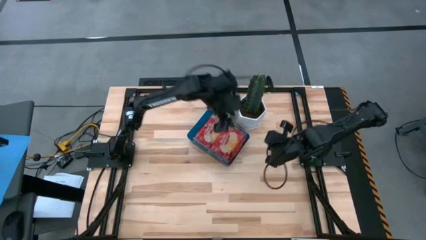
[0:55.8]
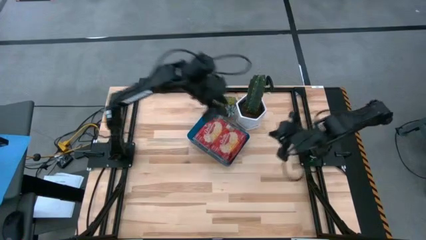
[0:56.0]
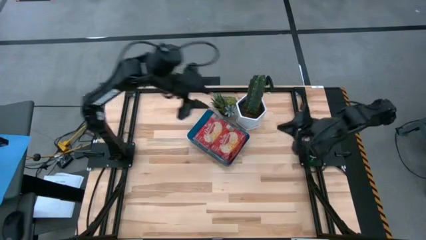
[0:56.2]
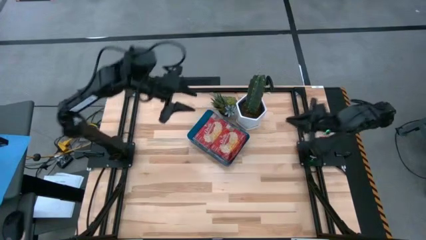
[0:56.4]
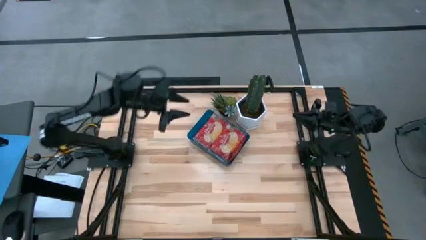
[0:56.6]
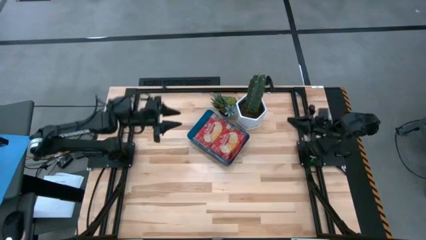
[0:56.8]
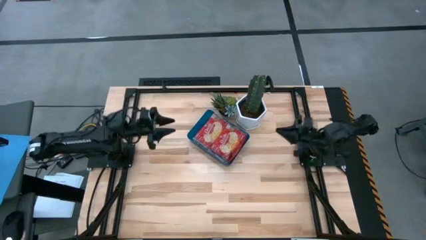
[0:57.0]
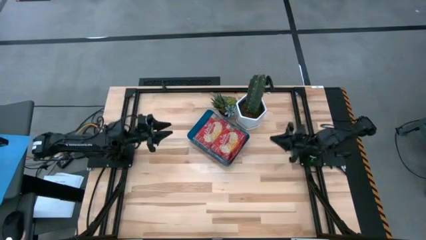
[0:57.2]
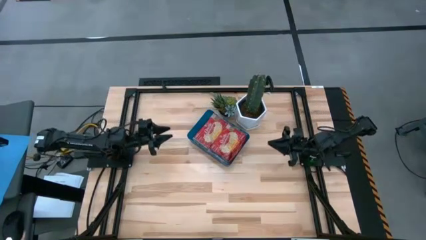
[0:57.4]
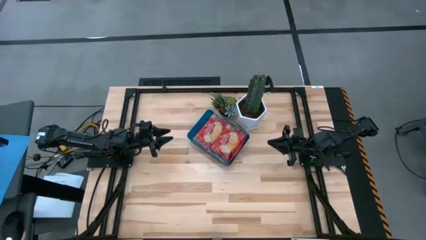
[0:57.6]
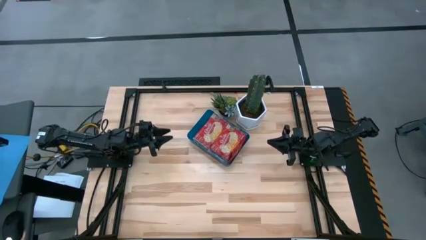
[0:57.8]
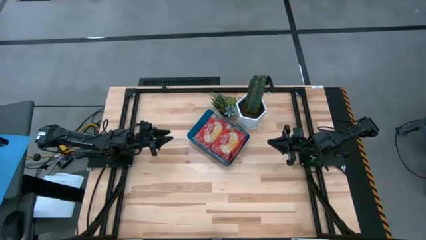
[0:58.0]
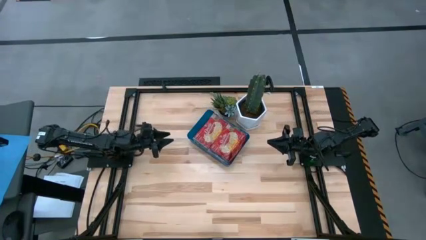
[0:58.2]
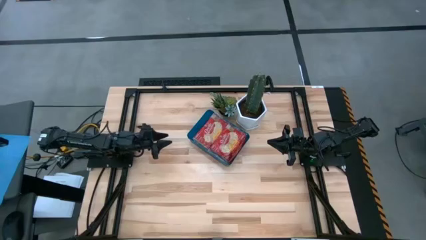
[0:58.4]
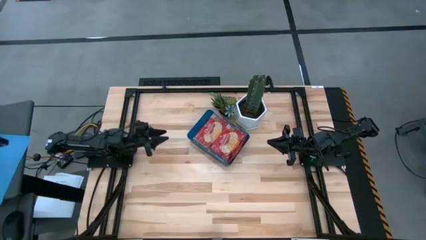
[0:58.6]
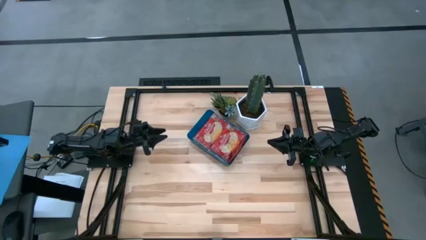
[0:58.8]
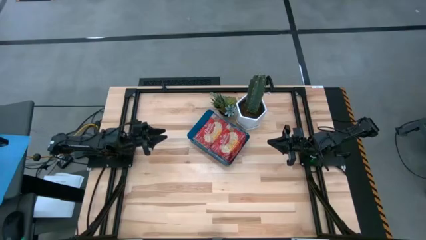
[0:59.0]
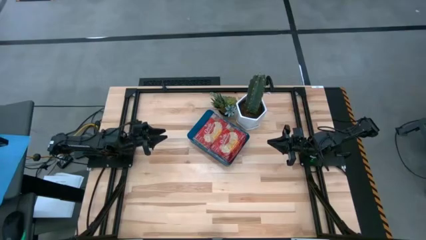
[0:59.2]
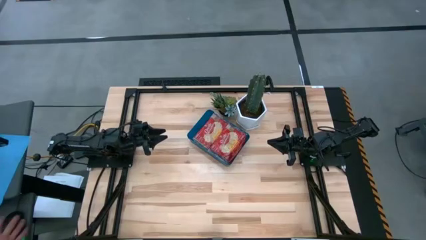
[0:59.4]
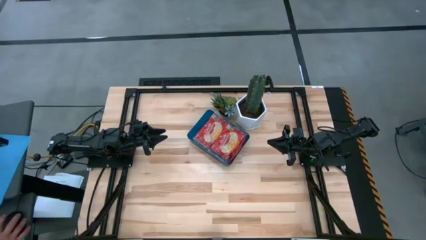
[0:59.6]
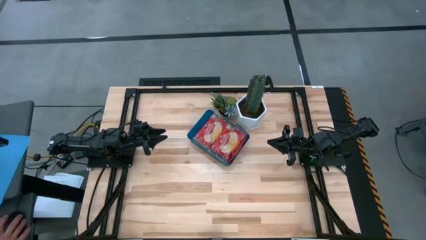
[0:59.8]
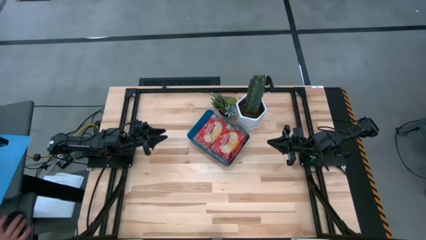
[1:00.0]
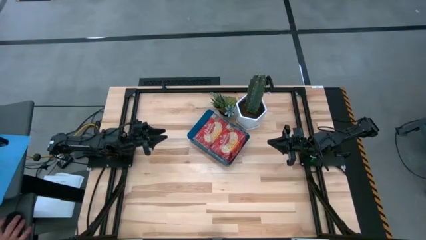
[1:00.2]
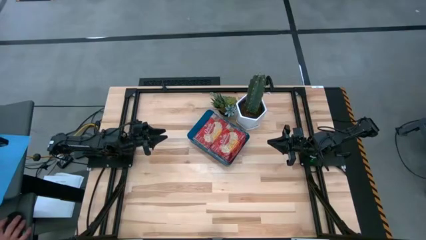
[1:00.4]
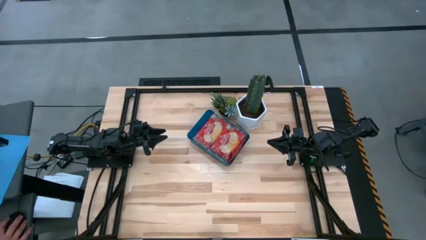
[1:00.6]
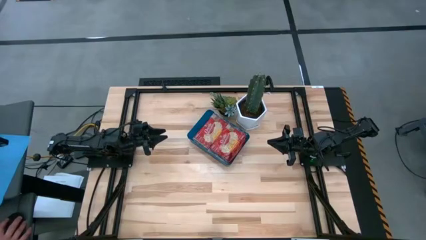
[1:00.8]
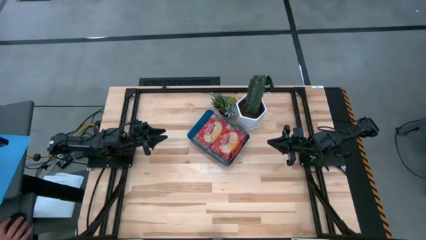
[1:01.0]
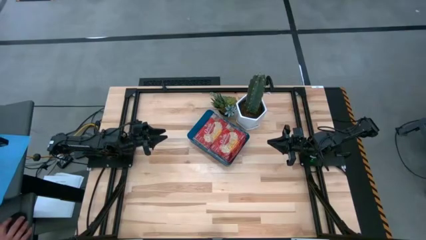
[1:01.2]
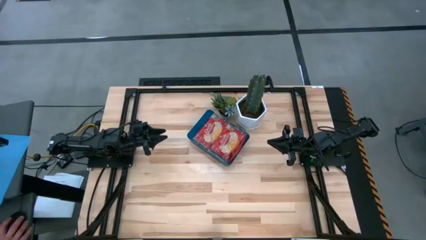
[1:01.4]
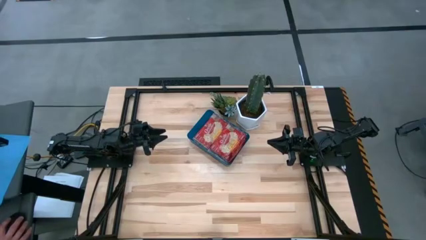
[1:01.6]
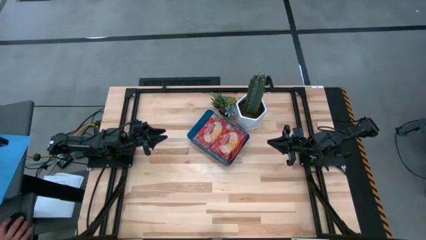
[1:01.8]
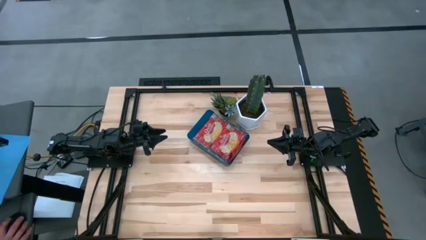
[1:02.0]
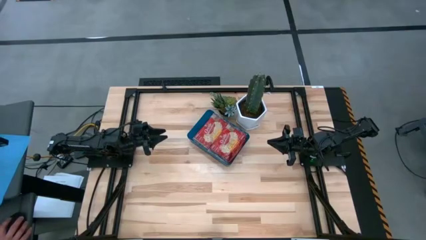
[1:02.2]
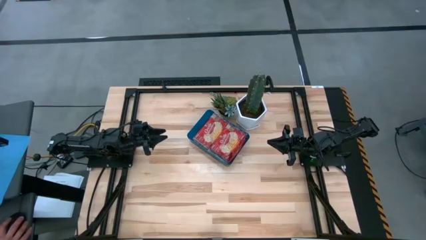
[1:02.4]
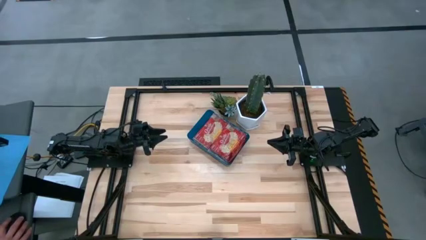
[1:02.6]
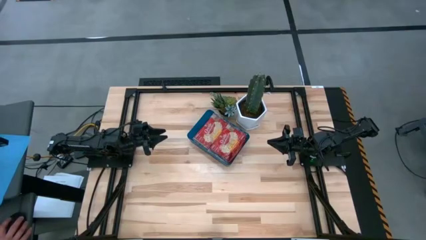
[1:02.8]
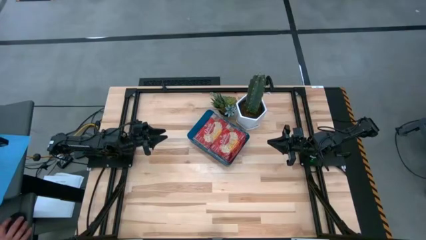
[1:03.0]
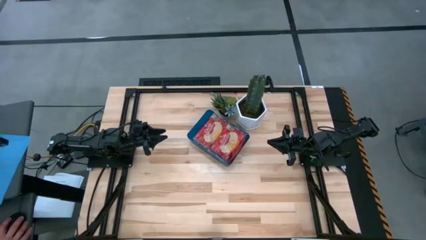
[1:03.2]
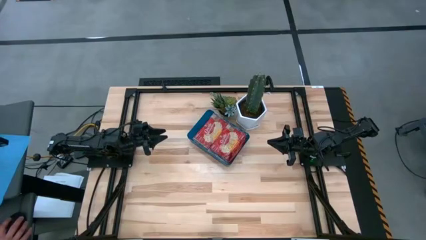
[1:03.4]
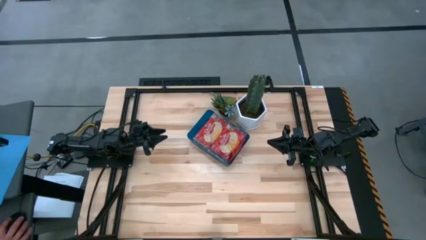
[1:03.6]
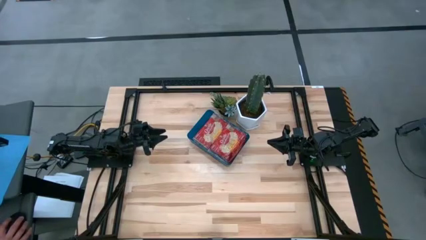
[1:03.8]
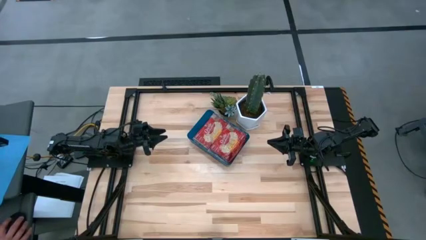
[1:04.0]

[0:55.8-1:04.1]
Task: Sort popcorn bags into baskets
Return to Home Position

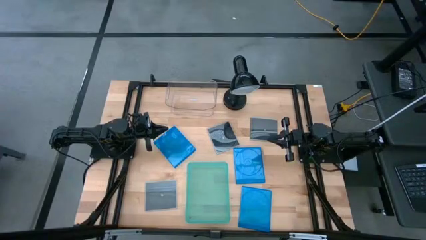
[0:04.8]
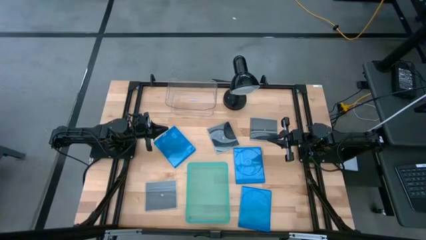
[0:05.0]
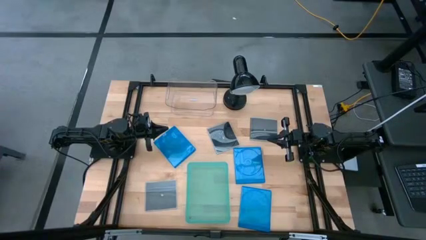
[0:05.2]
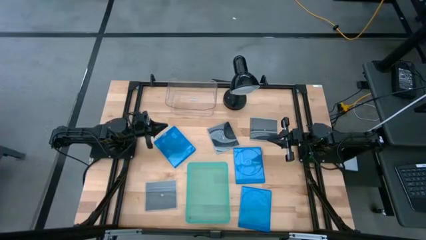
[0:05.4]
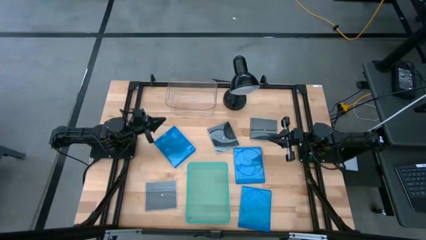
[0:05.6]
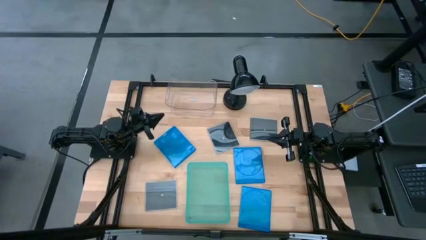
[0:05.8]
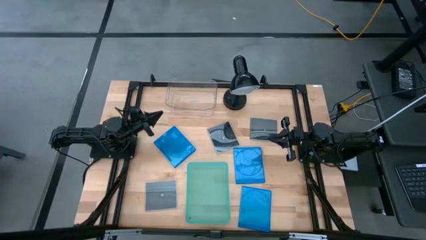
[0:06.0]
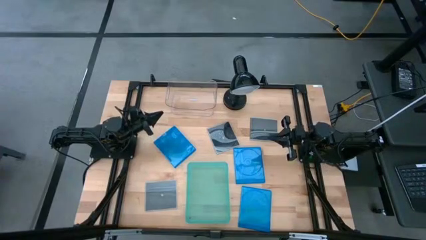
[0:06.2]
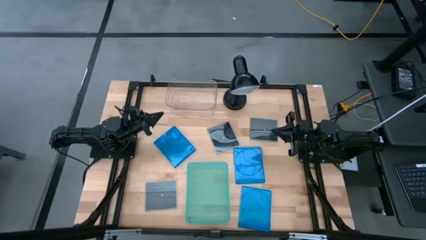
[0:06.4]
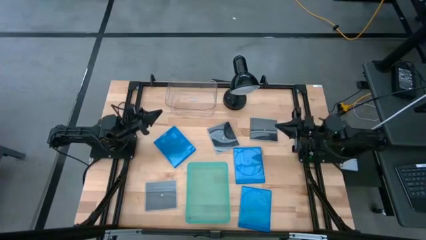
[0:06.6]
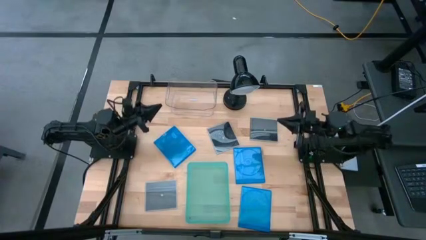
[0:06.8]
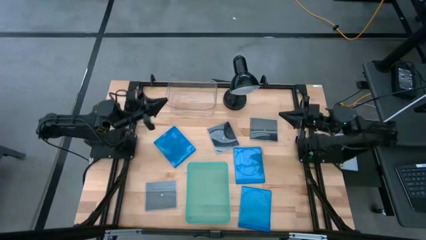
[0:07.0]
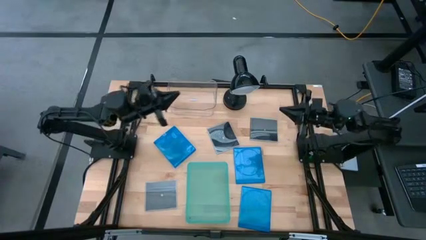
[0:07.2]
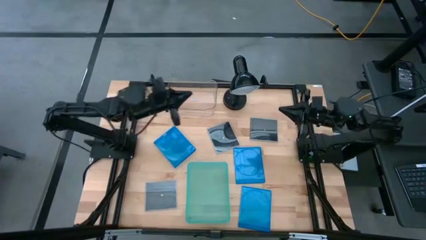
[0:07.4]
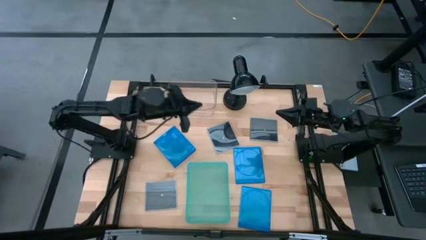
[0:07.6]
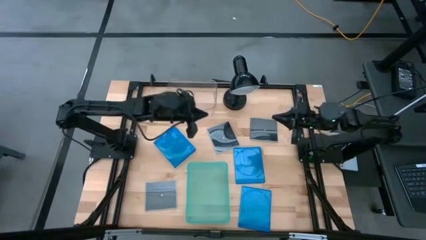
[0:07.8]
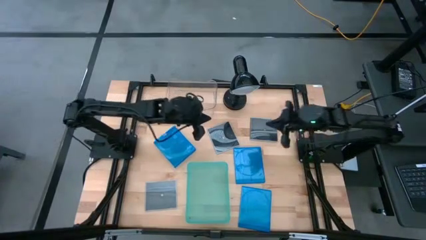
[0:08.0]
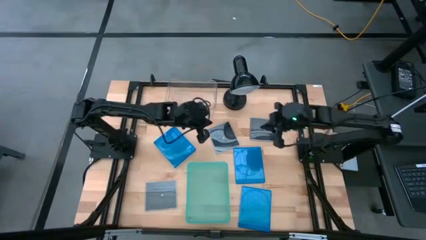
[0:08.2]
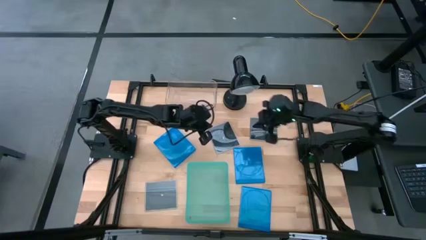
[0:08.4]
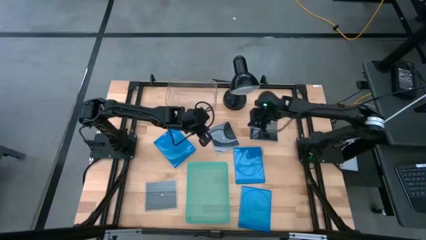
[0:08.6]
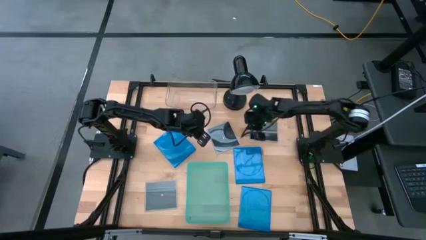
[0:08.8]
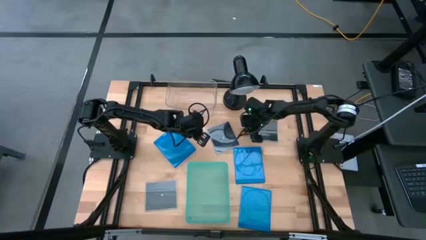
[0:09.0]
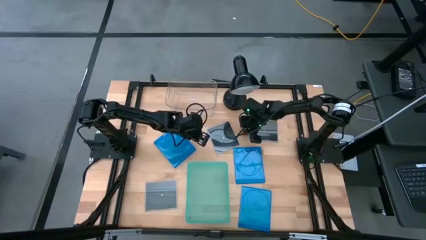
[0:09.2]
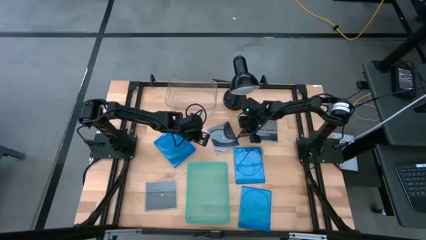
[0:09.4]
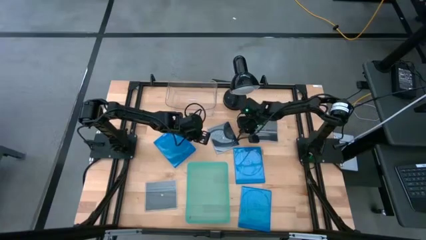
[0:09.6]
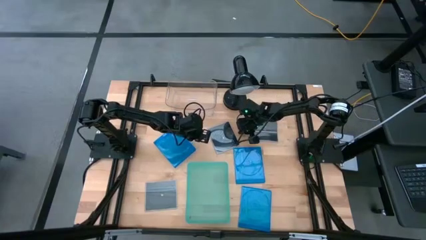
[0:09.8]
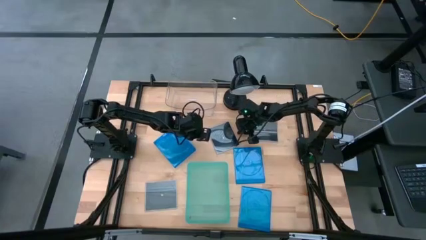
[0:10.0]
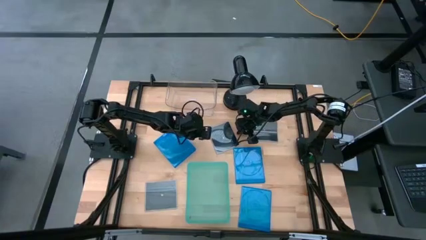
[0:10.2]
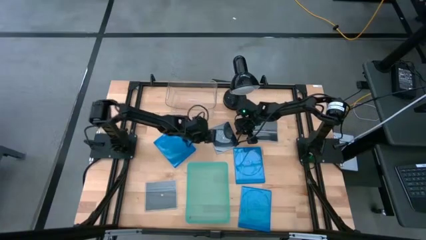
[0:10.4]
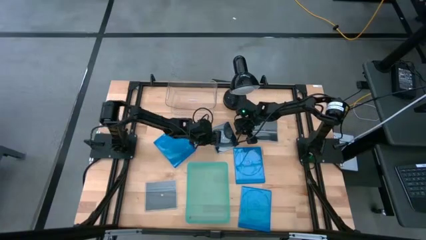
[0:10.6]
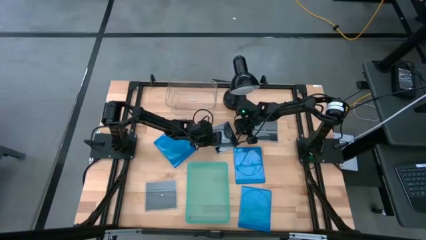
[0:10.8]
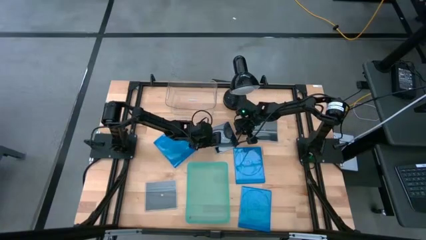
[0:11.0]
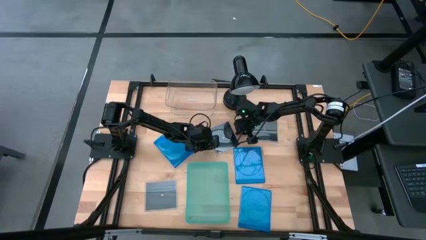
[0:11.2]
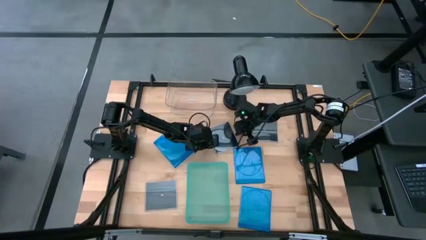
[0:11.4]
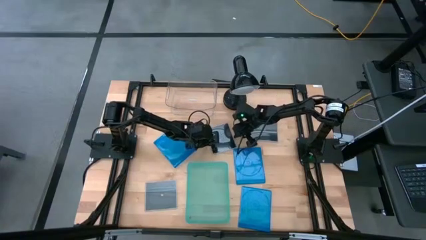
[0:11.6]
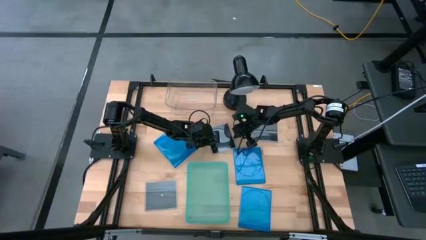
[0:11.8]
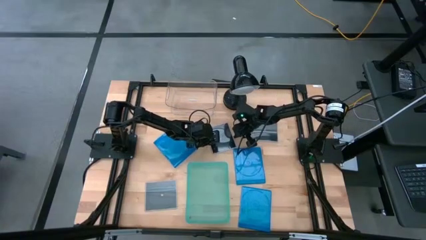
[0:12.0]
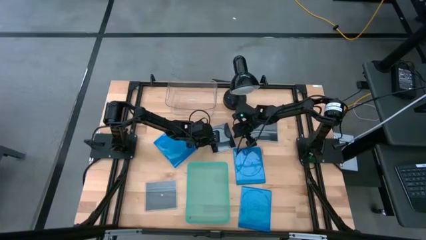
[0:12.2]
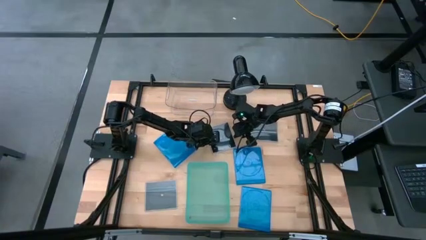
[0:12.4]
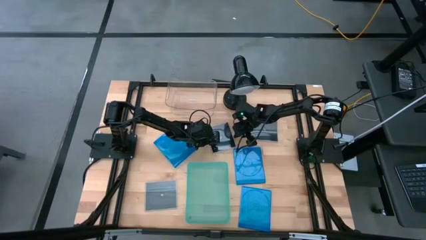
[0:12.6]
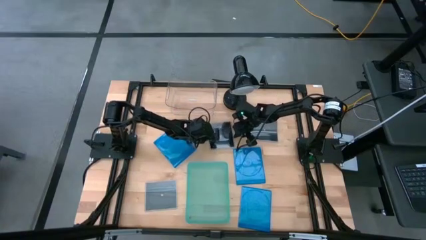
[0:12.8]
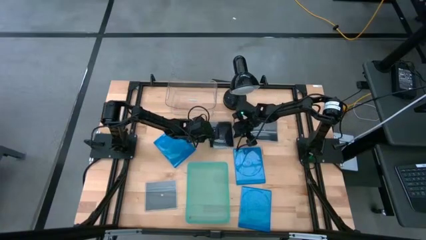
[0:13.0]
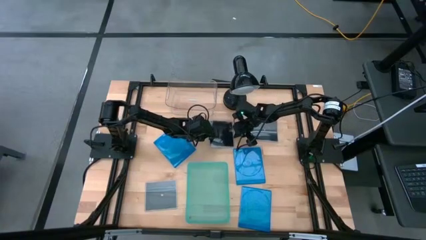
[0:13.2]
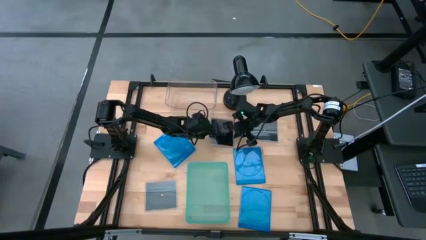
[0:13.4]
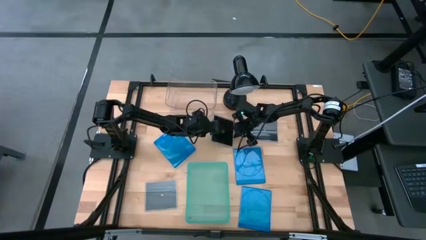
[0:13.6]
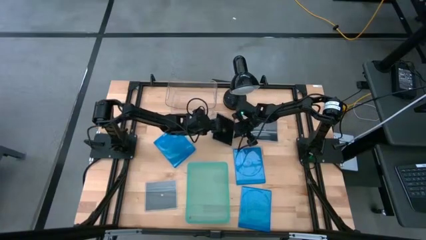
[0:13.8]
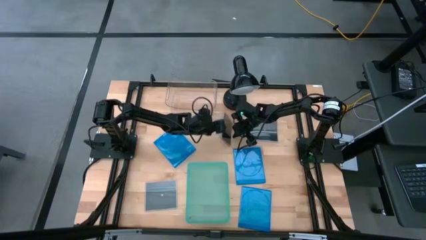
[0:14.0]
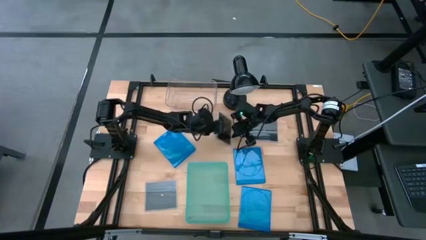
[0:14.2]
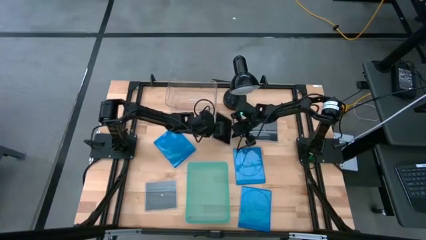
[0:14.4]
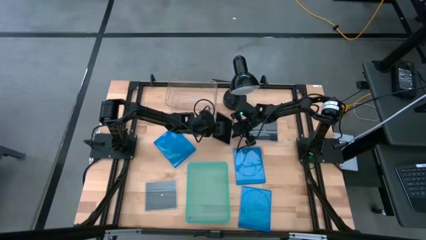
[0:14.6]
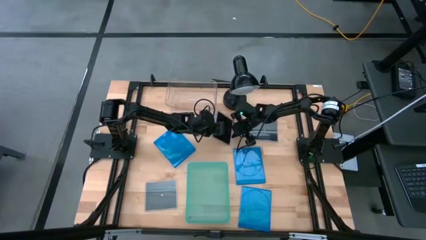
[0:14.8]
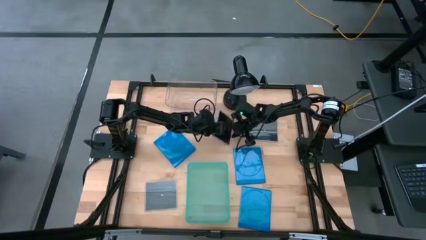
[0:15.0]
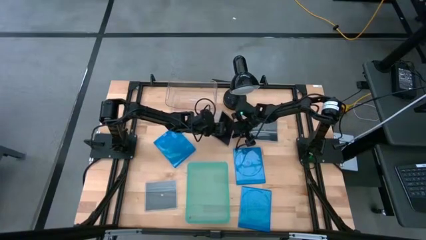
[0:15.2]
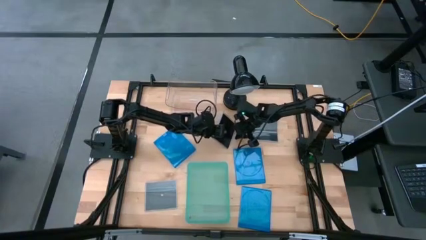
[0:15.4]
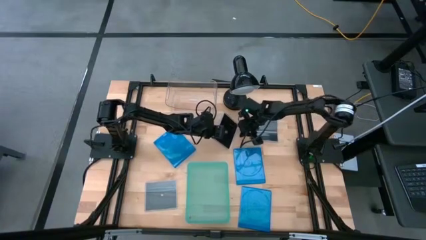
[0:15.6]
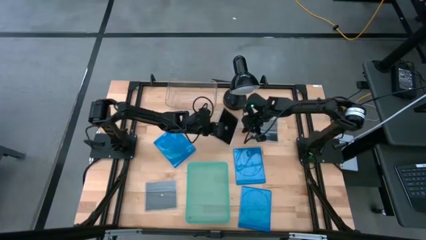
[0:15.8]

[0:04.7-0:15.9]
Task: Pick & place jewel cases by type
Put the middle black CD case into the transparent bin
